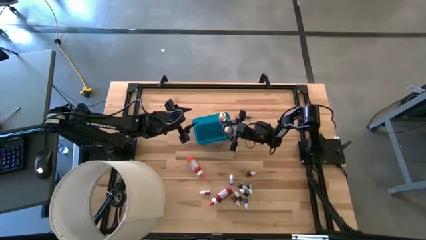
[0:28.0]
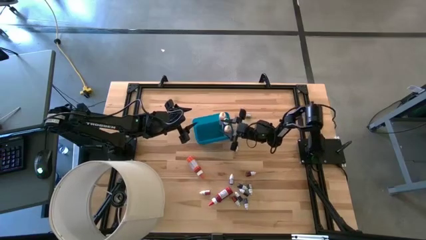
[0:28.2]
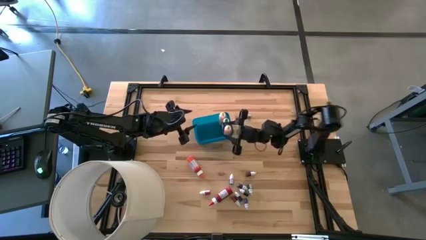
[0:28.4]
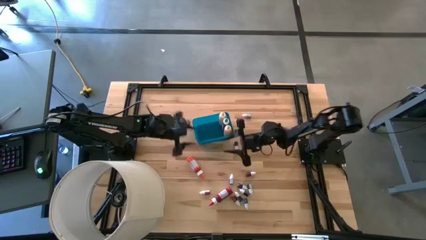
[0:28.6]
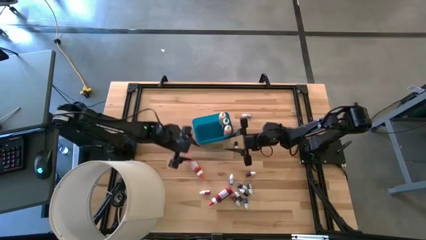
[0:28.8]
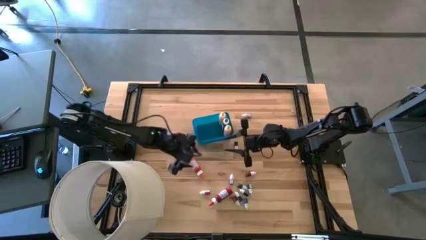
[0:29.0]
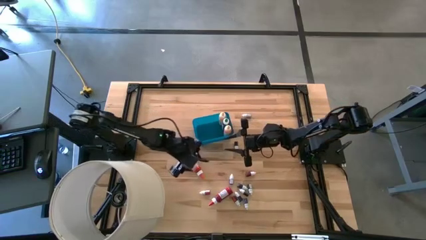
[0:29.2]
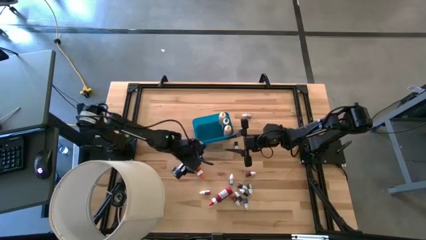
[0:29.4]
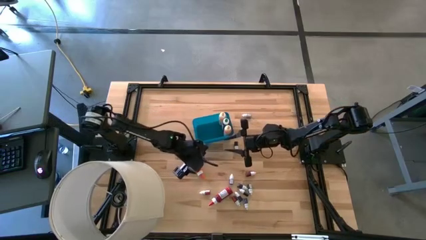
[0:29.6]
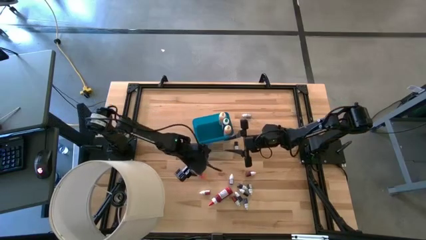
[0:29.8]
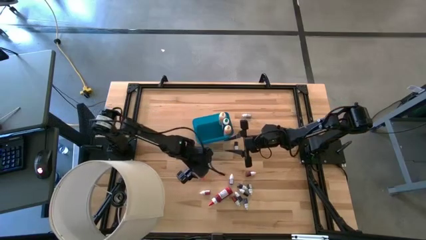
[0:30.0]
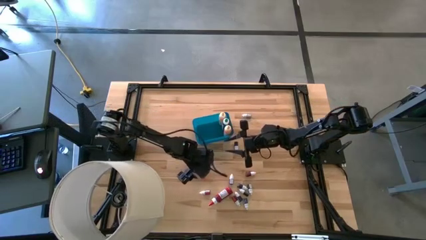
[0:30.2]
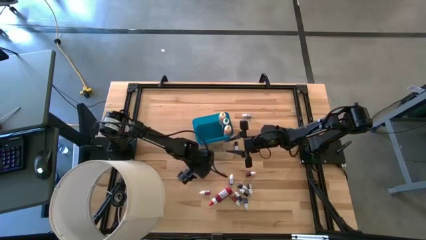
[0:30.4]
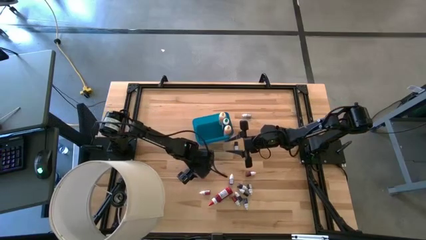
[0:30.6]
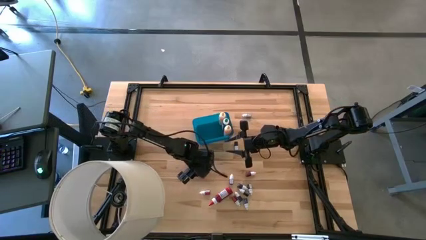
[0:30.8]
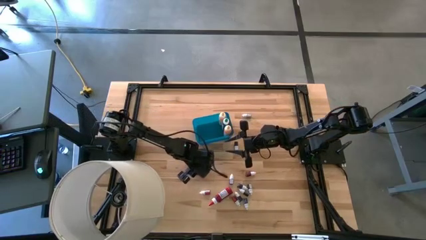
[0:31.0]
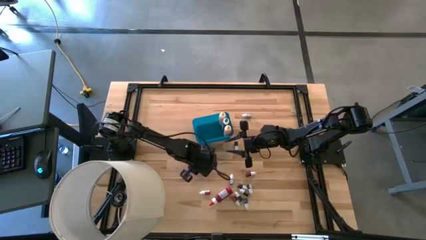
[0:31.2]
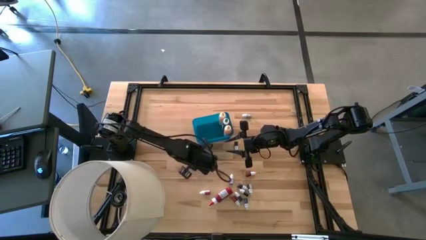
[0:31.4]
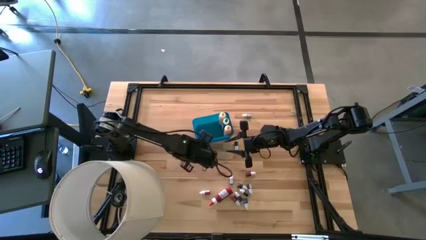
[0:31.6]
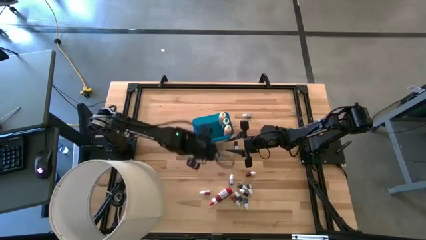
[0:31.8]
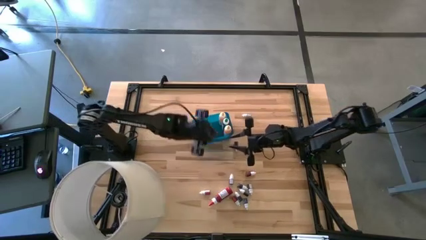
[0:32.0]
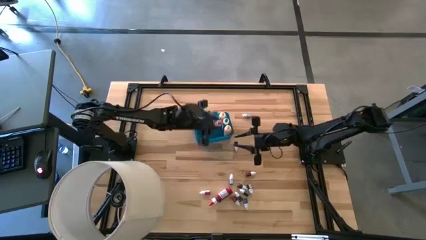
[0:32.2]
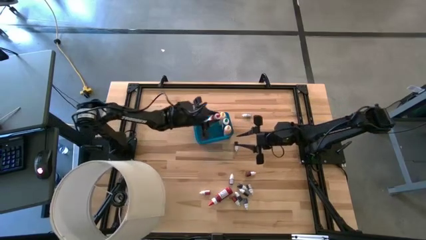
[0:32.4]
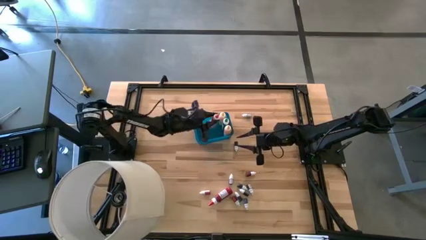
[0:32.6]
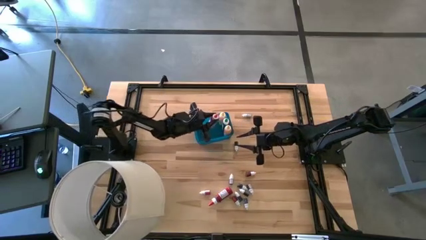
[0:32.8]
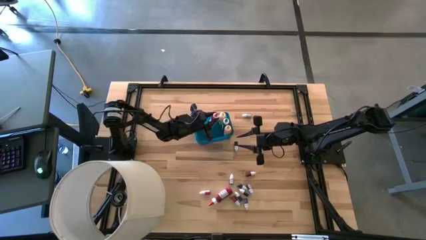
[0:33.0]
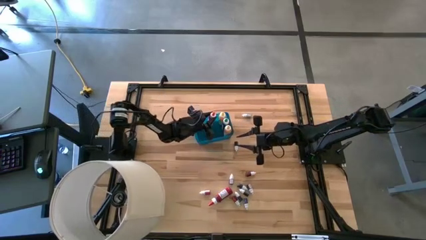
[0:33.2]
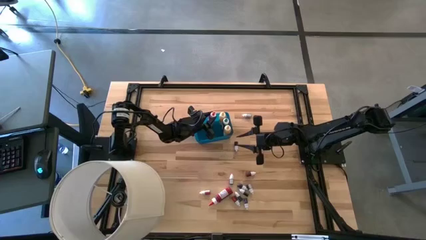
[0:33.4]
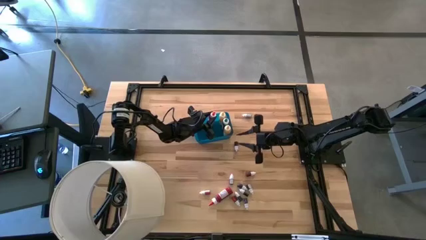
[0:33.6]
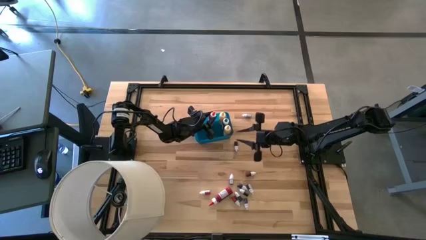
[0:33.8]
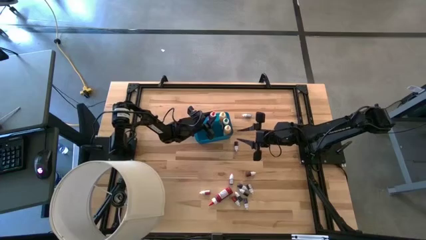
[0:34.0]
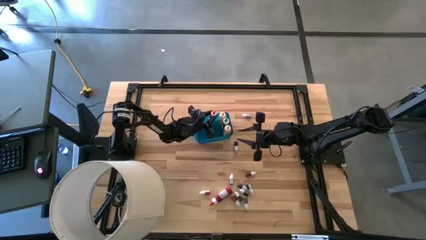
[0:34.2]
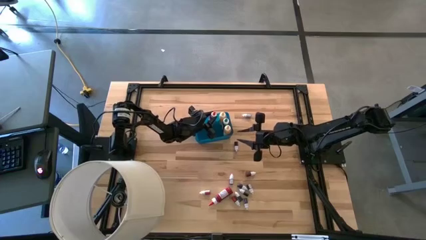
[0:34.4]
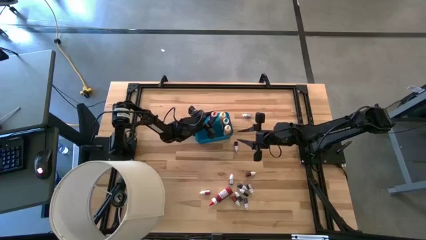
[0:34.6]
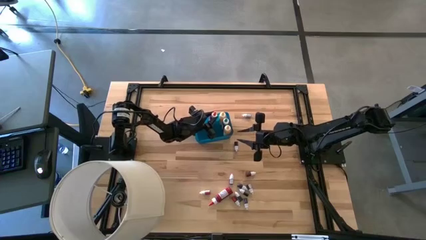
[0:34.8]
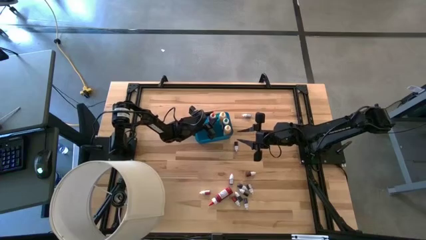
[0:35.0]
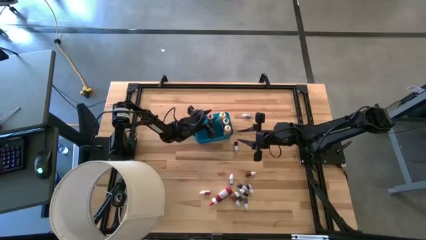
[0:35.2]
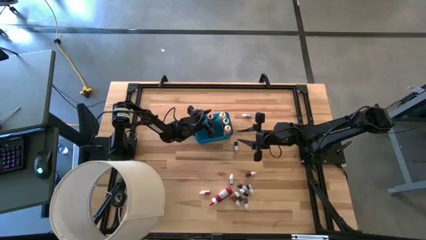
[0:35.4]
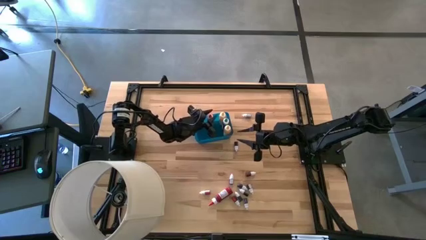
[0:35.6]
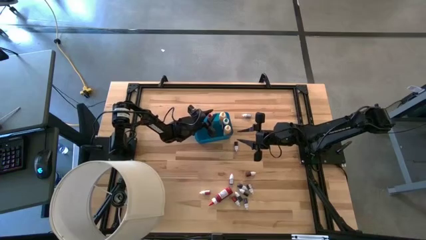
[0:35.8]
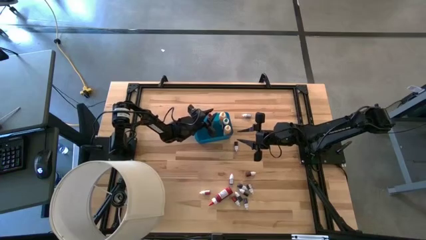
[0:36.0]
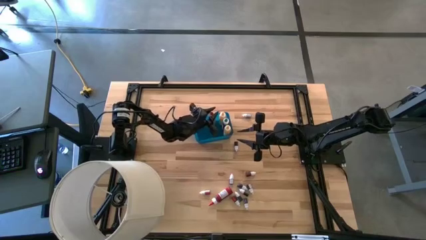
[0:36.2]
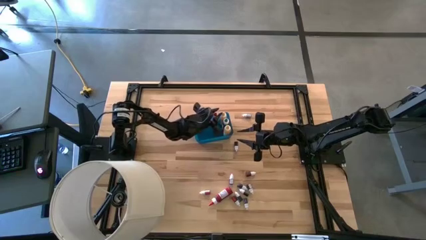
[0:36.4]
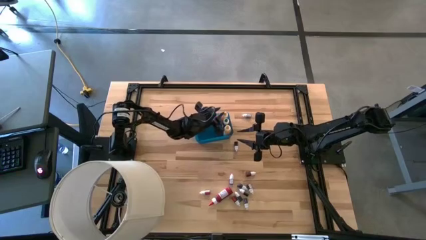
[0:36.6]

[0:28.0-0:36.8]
Task: Pick & Place food coloring
Put the big orange food coloring bottle into the bin

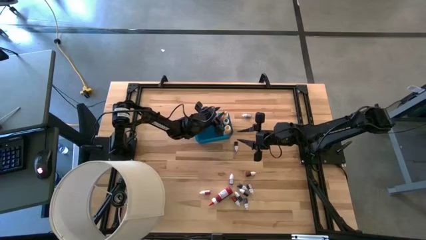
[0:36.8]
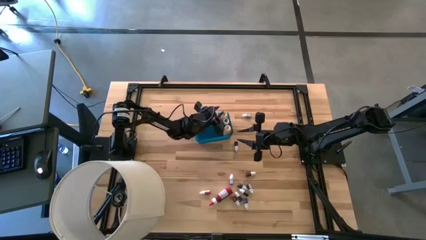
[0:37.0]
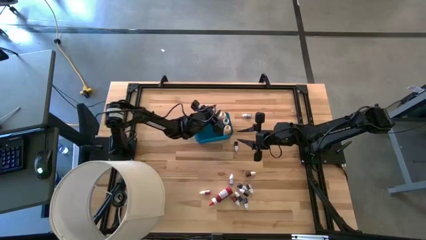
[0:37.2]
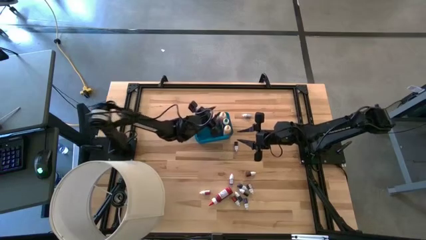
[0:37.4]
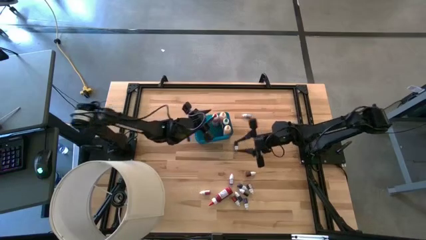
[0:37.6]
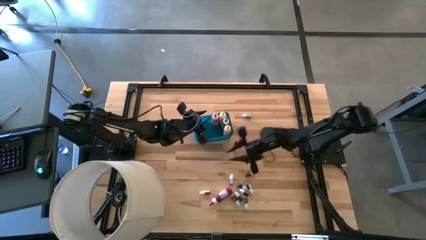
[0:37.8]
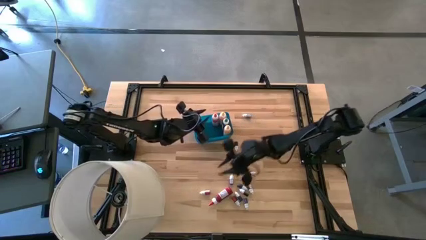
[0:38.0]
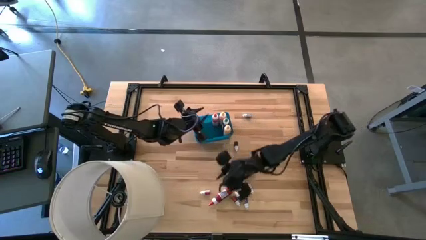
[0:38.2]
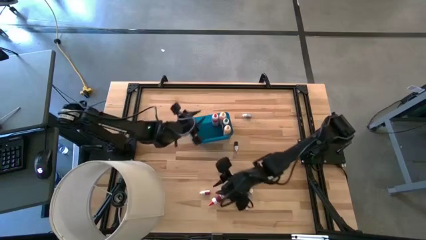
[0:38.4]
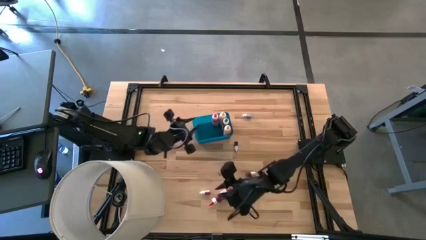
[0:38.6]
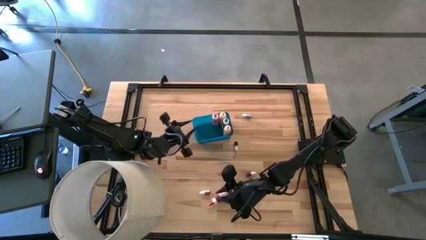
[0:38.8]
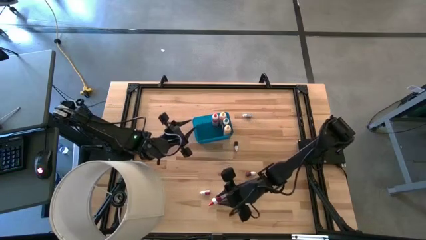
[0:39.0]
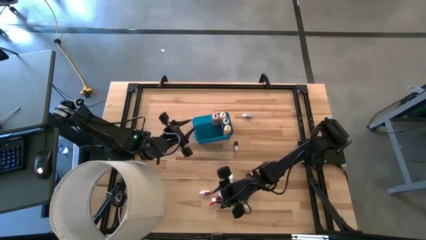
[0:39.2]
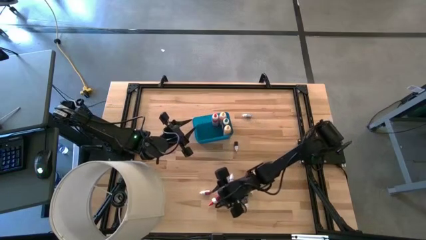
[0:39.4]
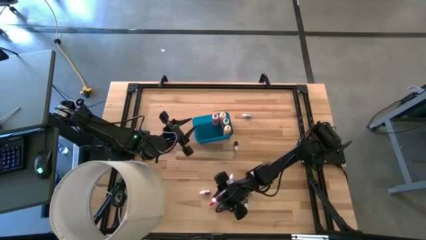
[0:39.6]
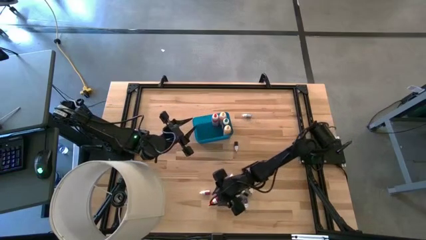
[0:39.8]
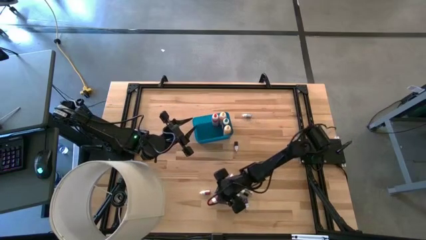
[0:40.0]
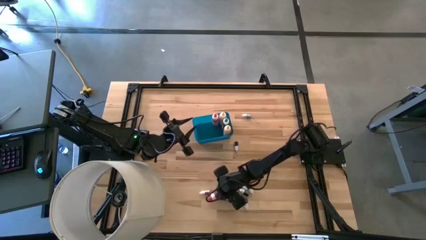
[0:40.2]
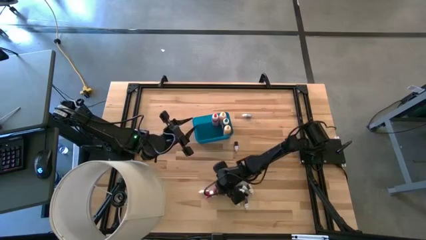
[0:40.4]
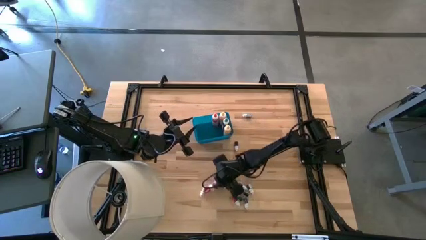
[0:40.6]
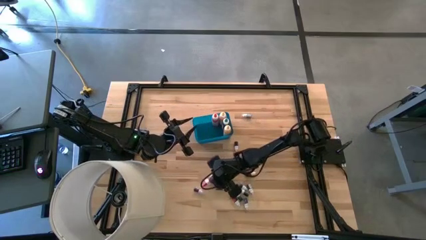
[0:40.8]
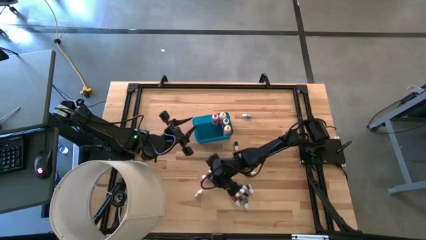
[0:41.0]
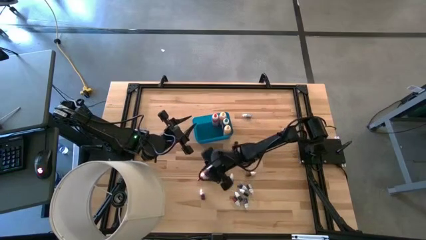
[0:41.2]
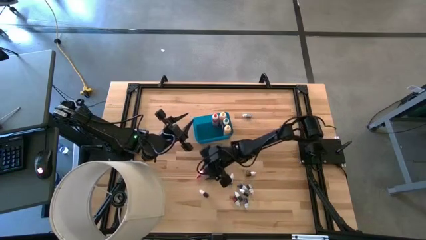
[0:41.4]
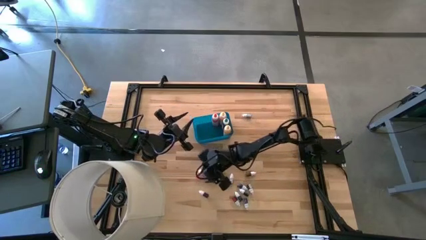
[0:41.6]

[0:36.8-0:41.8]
Put the big red food coloring bottle into the bin

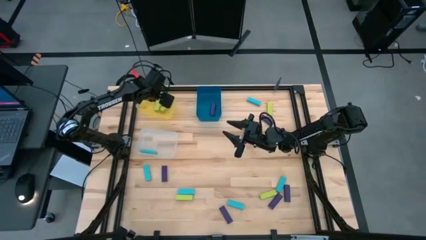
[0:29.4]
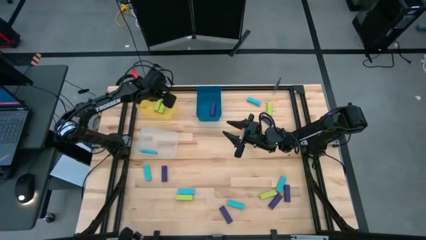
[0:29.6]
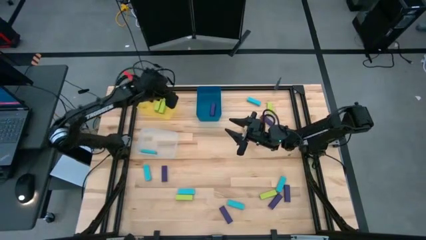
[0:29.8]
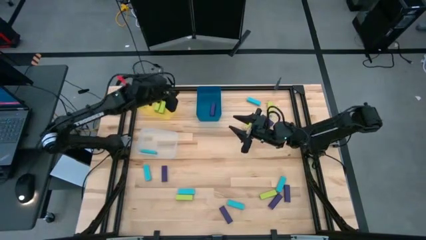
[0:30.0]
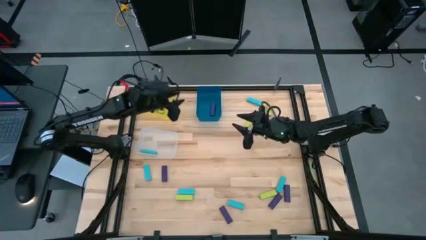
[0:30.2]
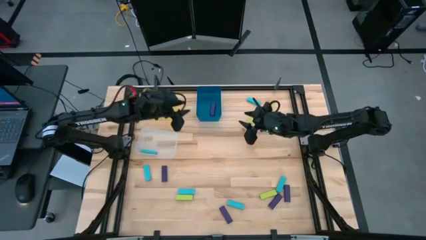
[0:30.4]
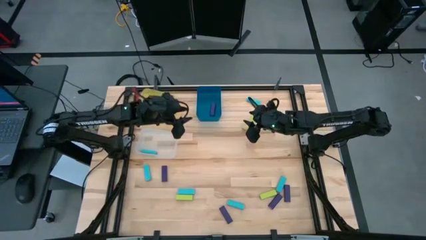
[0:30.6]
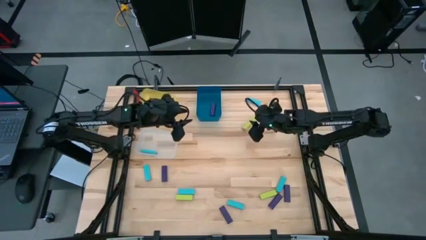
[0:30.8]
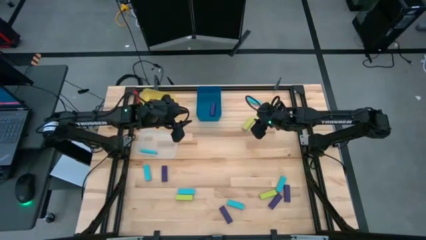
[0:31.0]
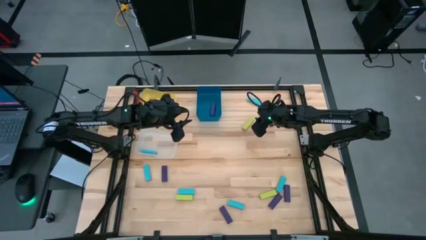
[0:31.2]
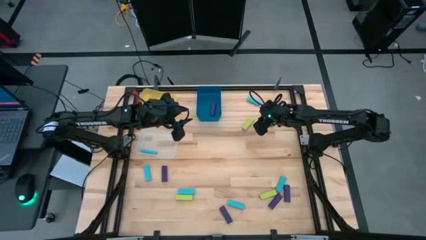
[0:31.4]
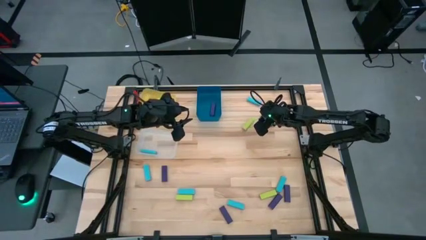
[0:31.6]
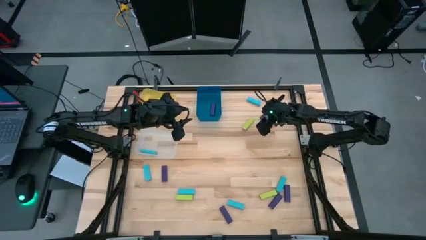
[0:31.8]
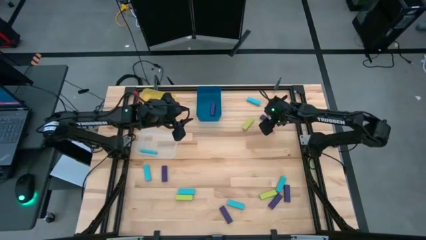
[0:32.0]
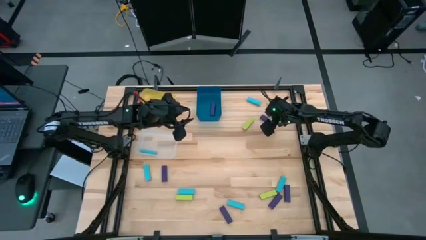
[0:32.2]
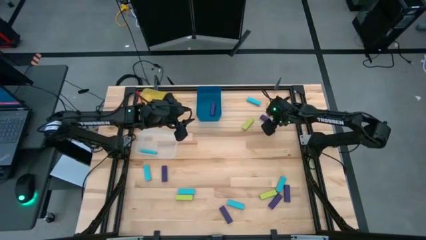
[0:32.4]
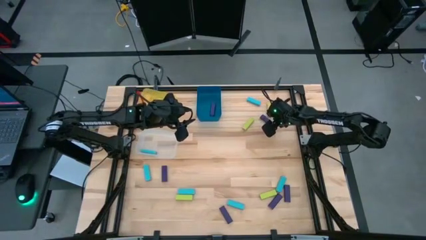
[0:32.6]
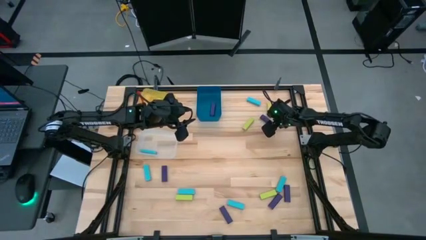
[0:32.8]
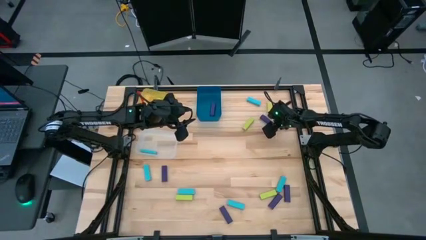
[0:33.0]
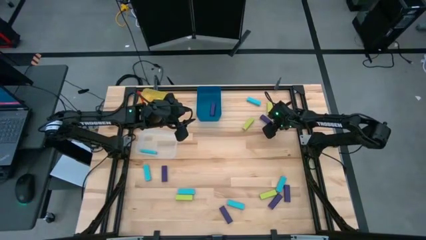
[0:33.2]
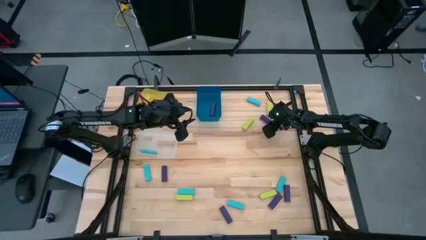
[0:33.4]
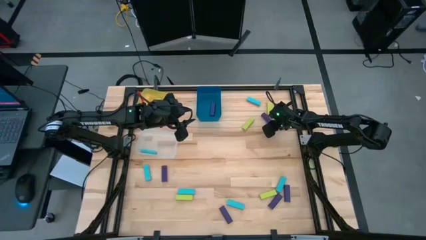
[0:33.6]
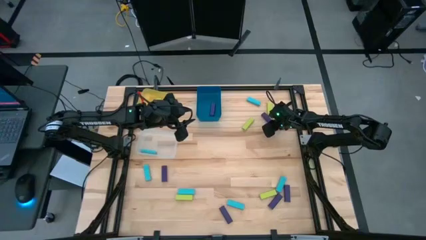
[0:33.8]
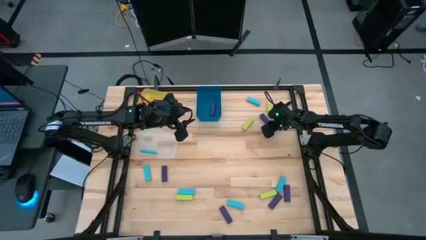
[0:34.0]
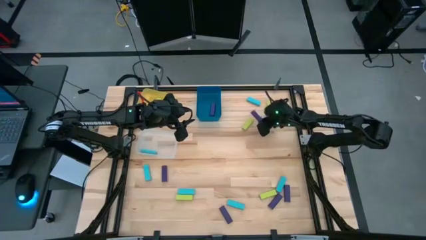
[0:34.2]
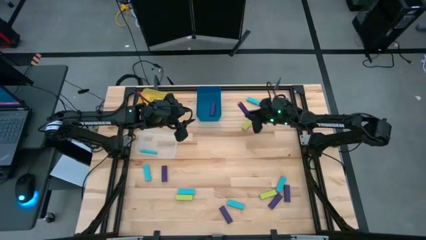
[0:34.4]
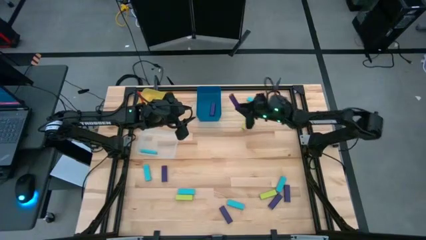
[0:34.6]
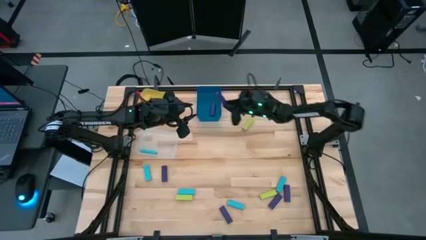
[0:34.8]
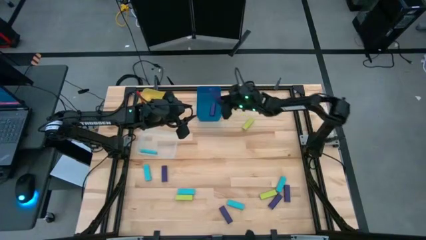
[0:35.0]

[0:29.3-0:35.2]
Task: Sort blocks
Put the purple block into the blue bin
